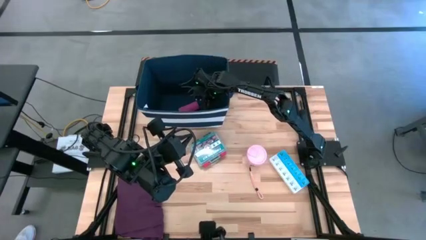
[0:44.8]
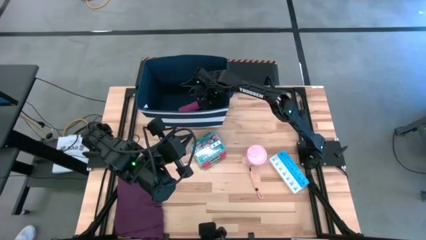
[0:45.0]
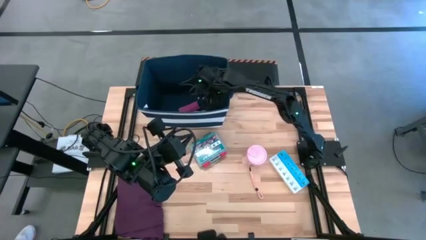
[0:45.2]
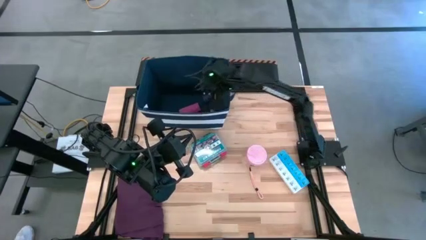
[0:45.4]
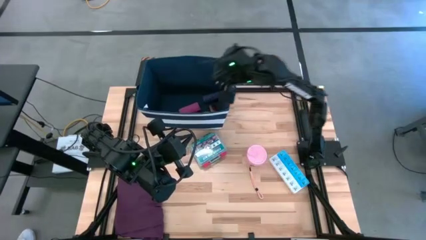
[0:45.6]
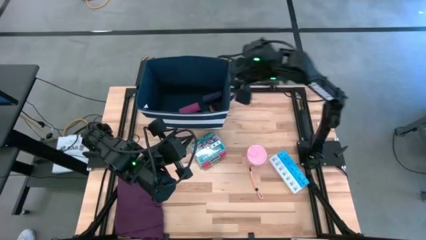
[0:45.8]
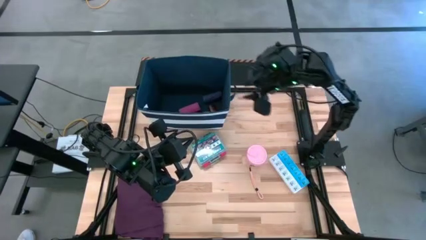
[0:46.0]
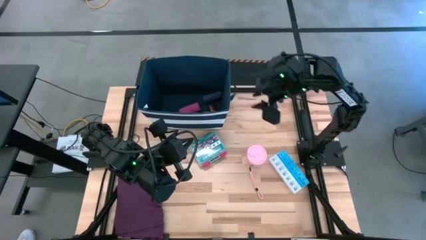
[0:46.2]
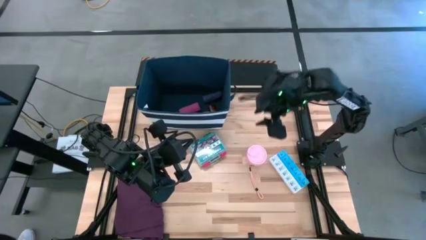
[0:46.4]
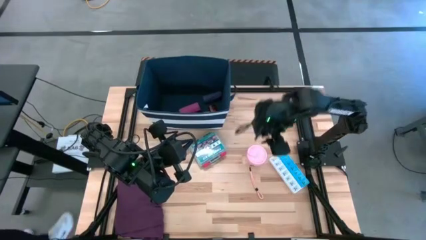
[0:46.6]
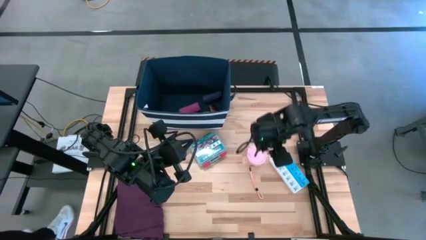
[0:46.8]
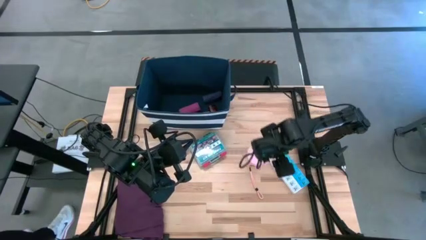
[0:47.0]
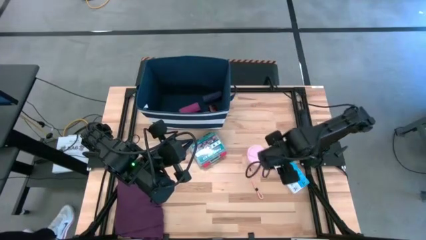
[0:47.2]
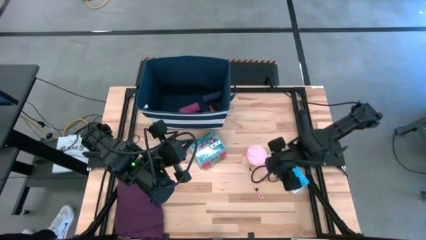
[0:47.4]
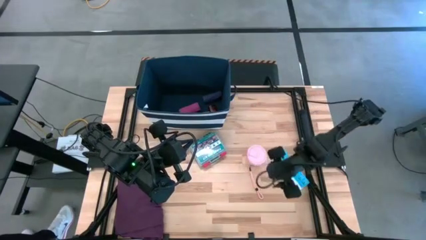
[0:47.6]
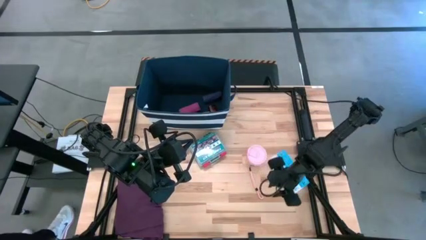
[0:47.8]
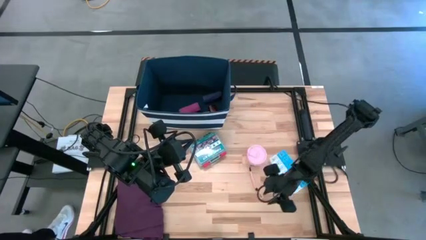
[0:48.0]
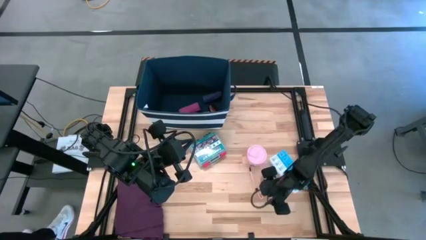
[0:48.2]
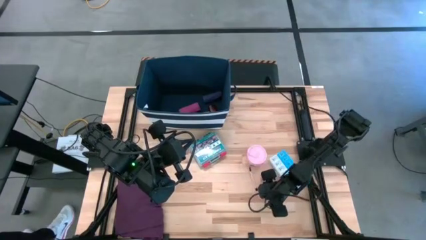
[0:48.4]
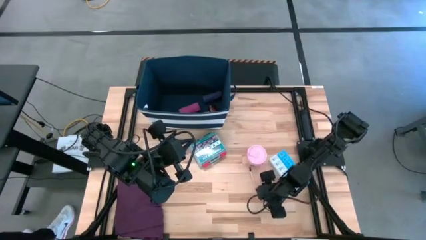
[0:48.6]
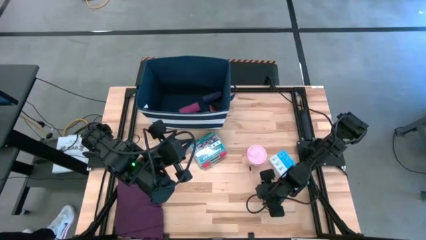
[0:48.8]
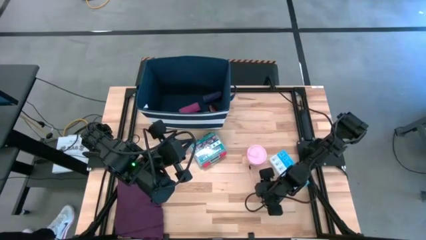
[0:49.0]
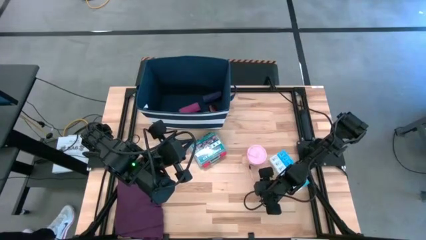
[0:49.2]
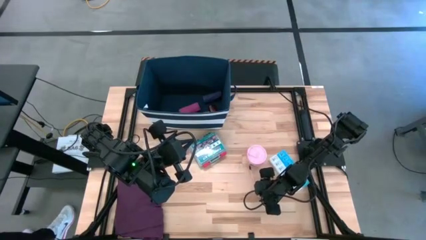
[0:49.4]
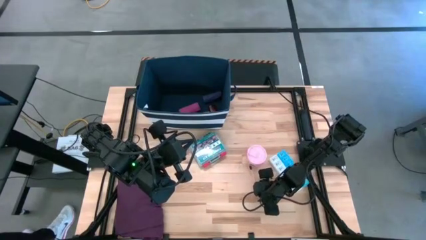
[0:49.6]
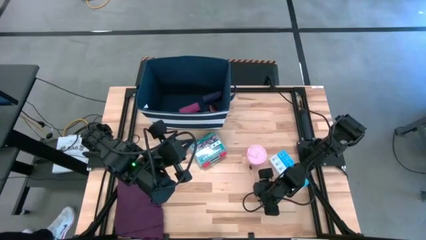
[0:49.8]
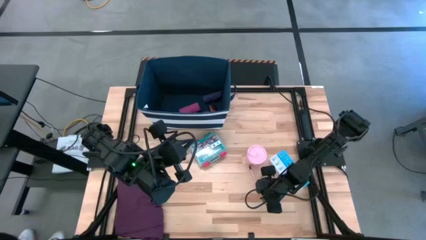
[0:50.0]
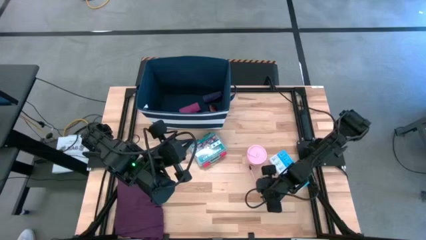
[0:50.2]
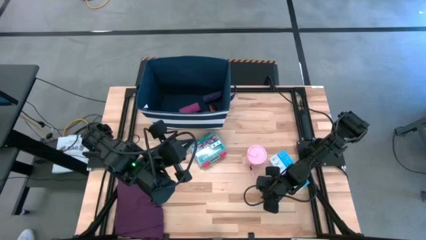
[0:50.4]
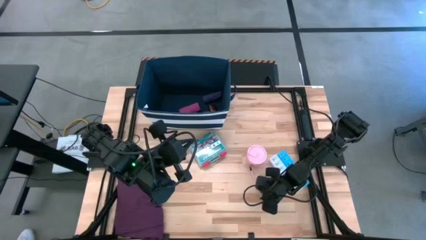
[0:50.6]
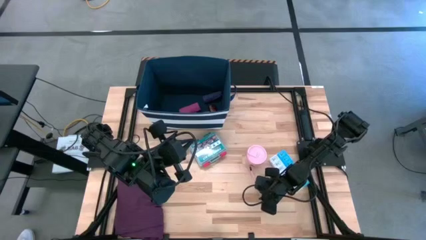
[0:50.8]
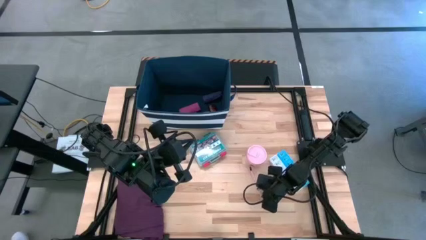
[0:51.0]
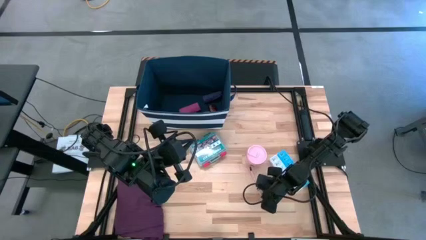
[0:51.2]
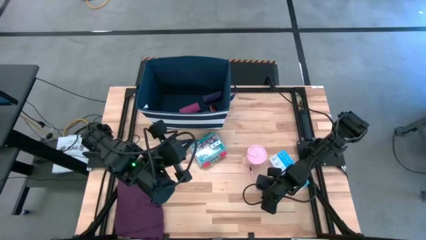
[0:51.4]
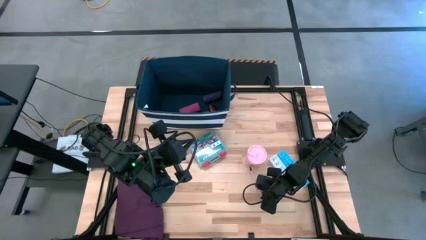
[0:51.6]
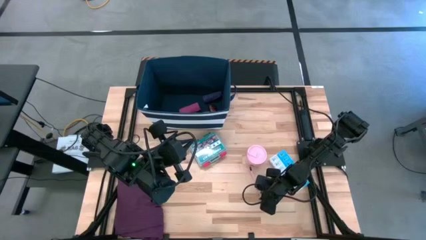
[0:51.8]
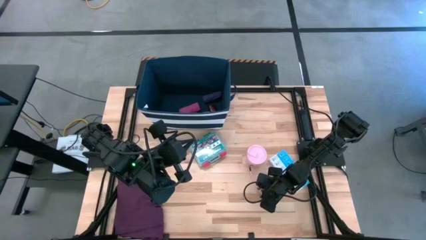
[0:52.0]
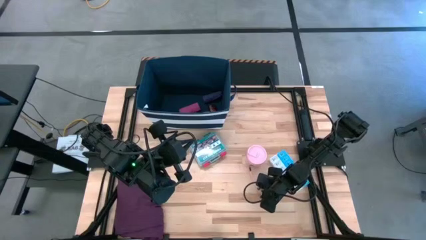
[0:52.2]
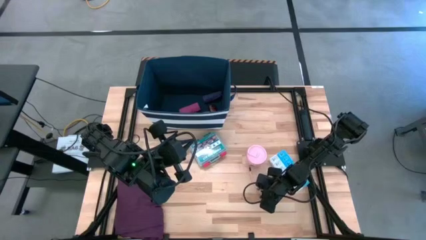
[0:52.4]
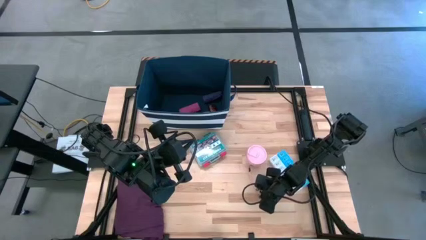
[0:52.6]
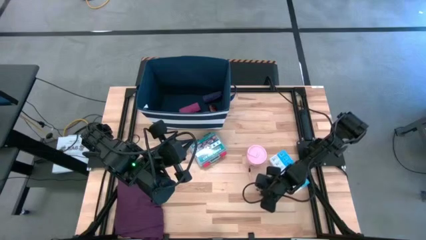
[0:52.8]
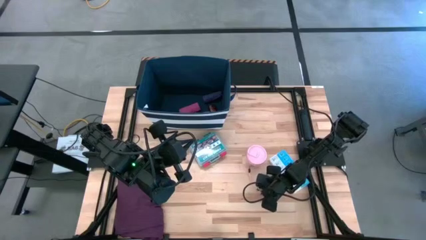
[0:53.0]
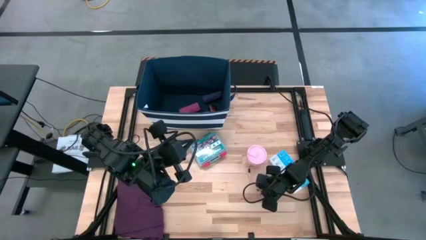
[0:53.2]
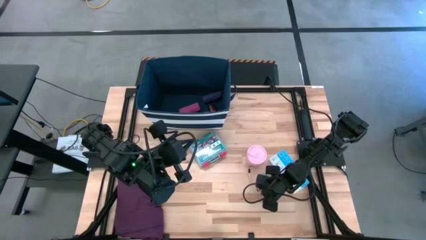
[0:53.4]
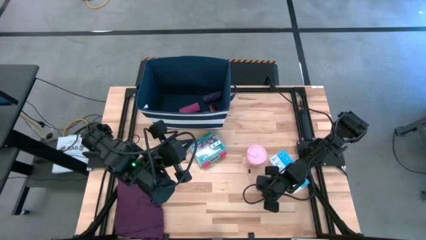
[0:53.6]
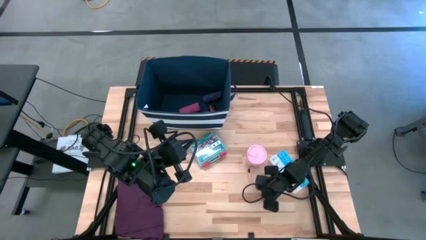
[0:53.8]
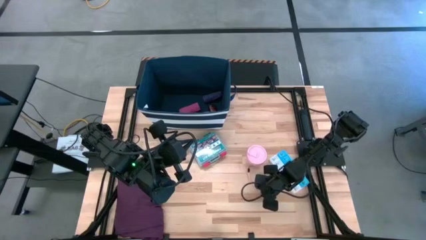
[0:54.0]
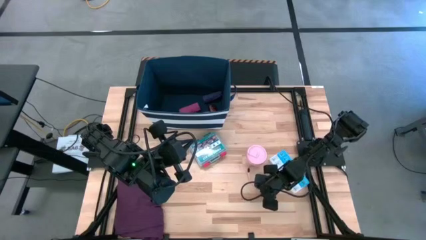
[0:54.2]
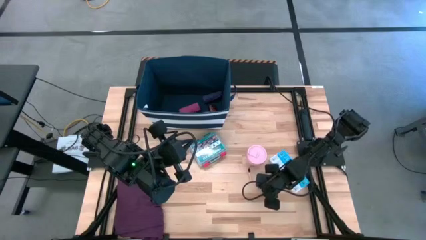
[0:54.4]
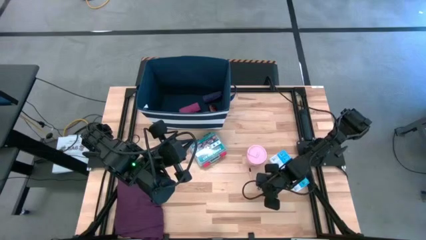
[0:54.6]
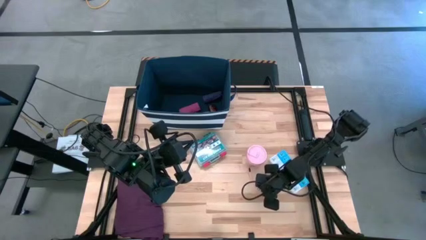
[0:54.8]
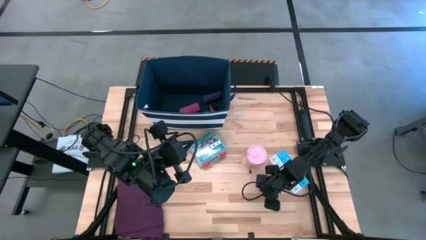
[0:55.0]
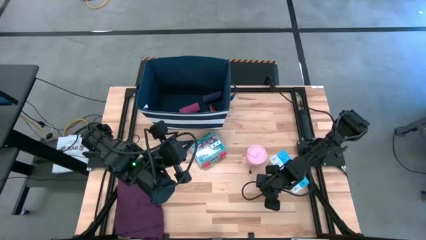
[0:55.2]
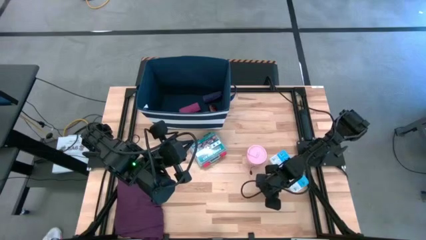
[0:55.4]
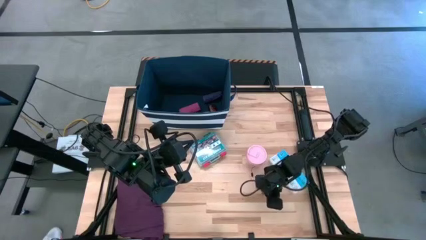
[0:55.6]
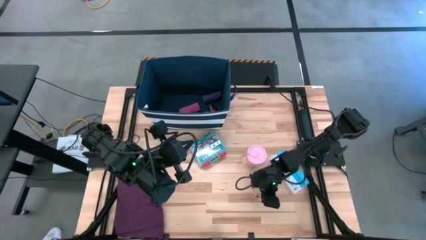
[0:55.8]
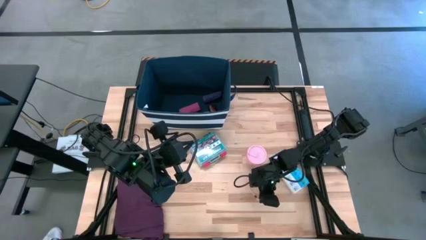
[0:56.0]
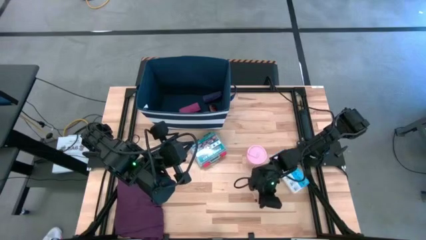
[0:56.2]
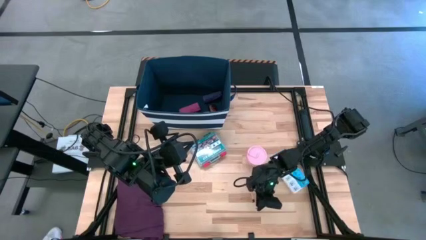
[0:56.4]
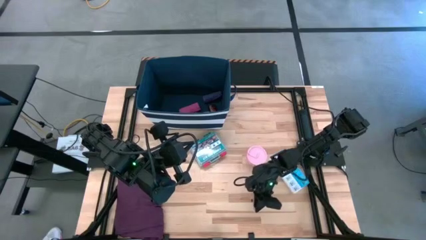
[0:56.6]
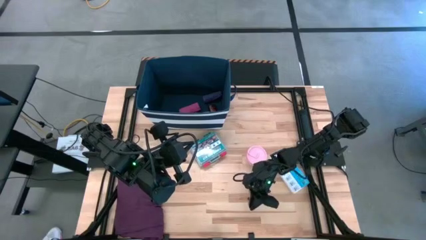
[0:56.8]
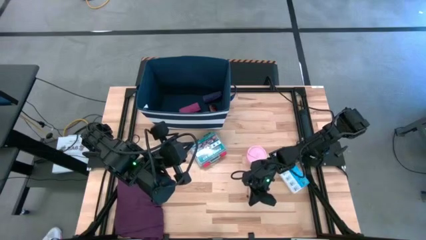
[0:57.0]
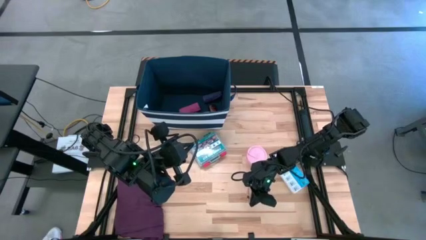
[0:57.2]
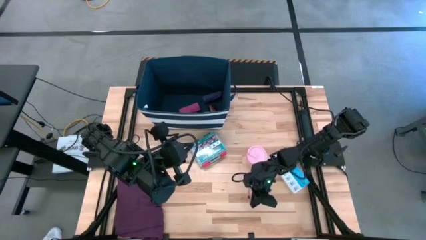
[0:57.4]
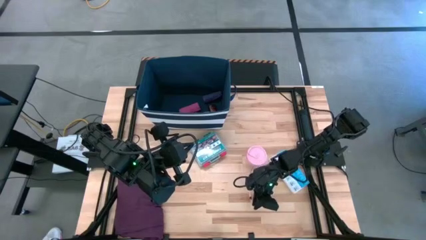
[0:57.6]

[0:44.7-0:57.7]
Task: Pick & place medical supplies in basket/bin
Put the pink container into the blue bin
